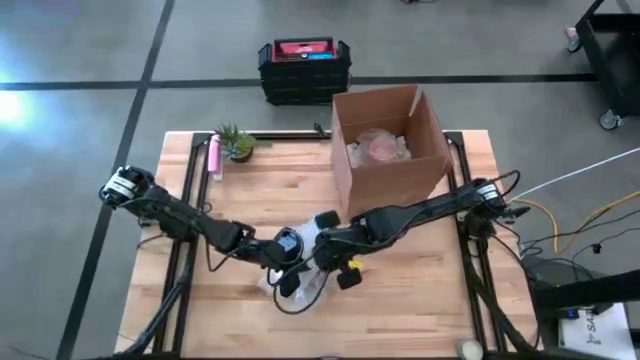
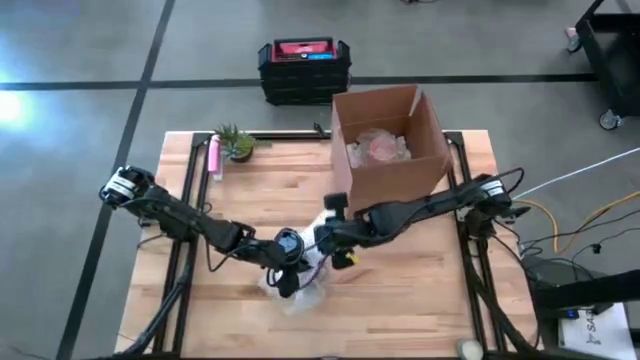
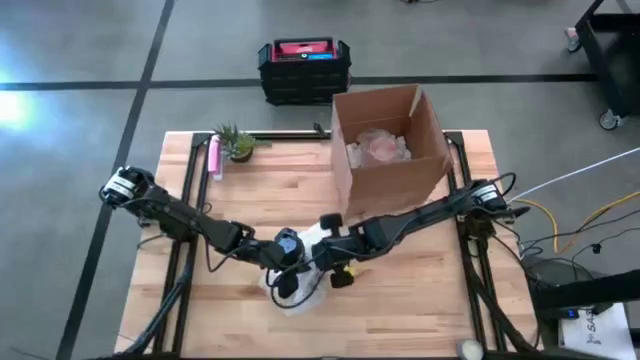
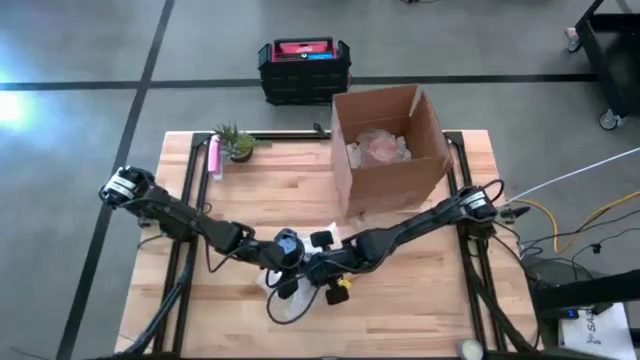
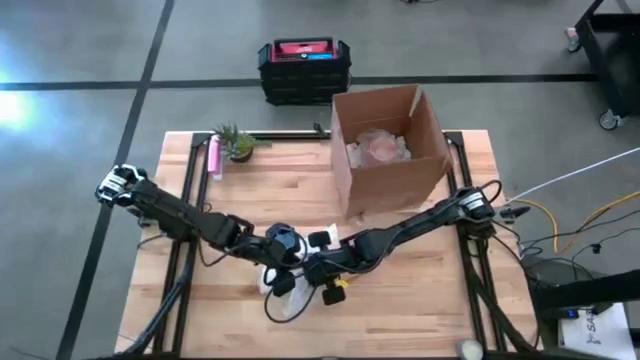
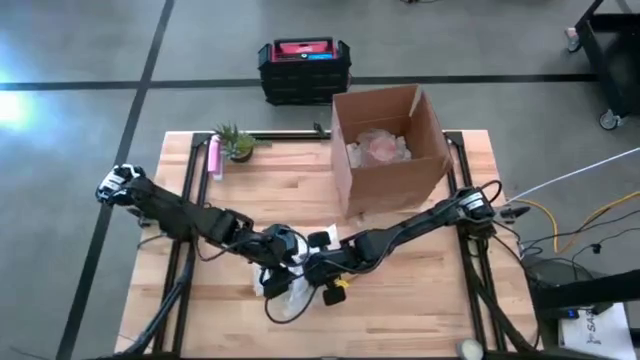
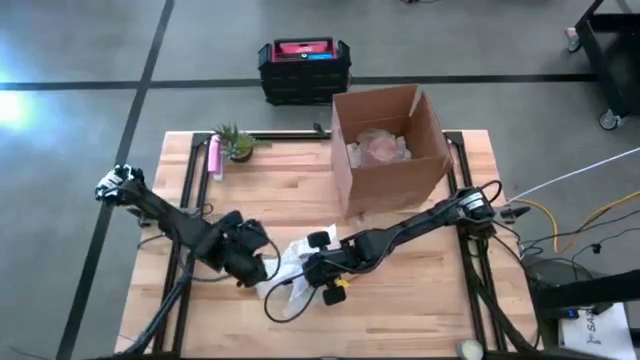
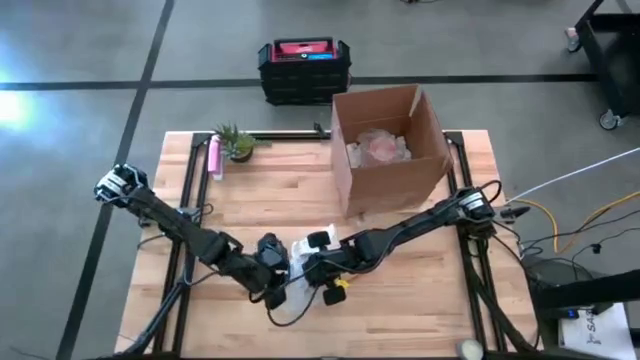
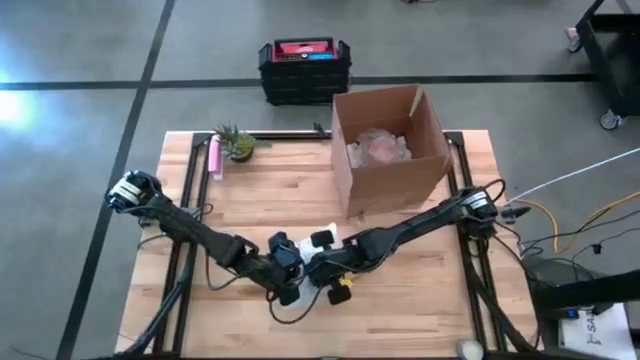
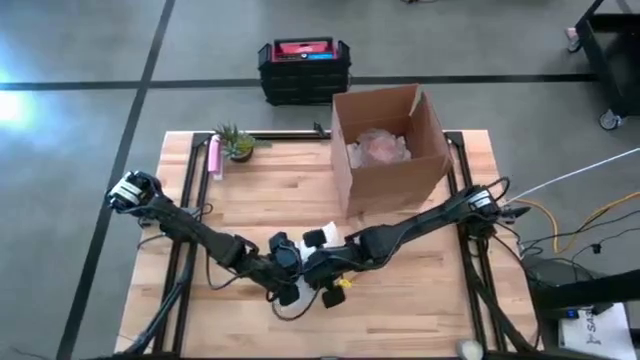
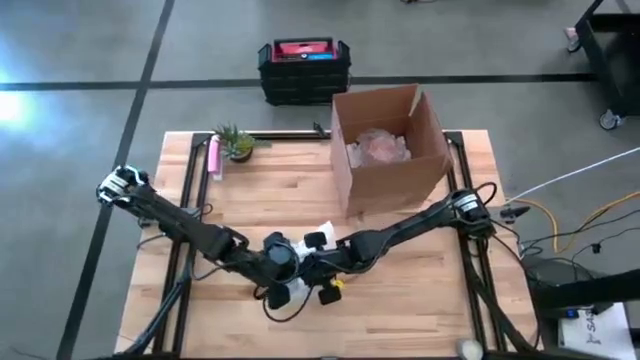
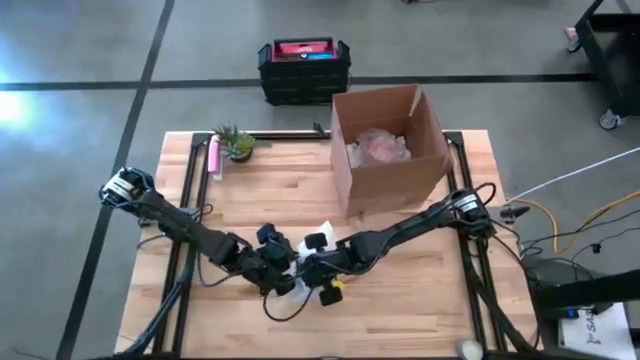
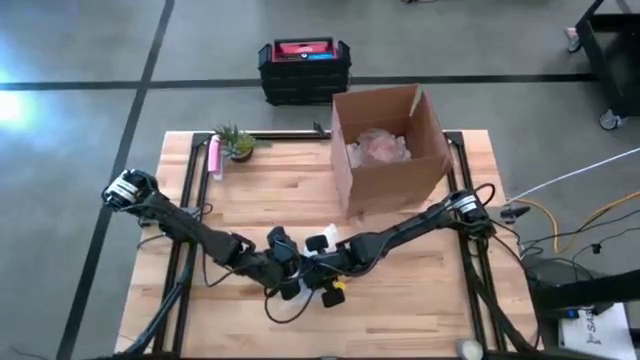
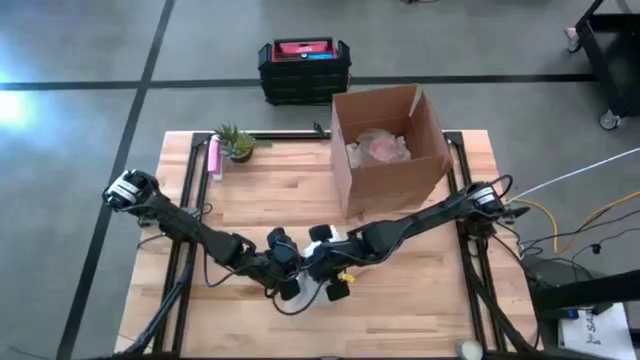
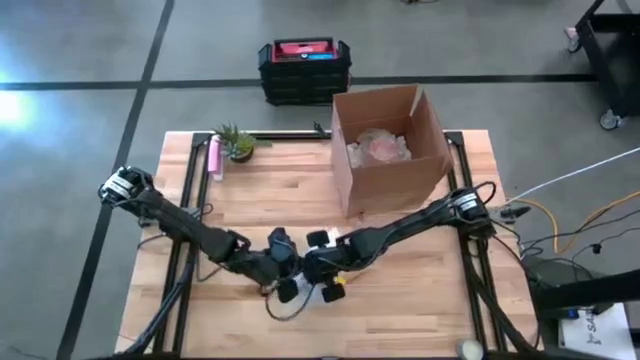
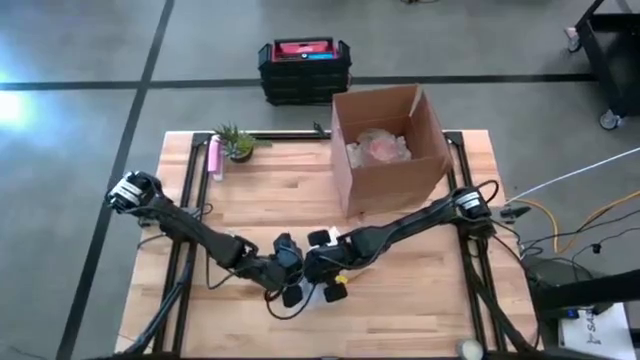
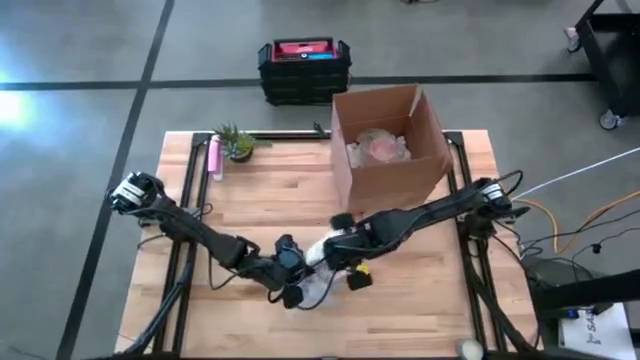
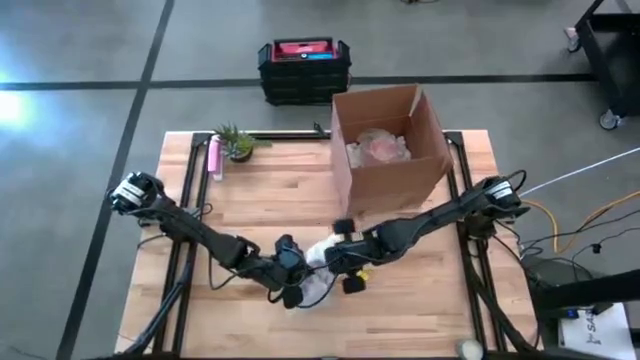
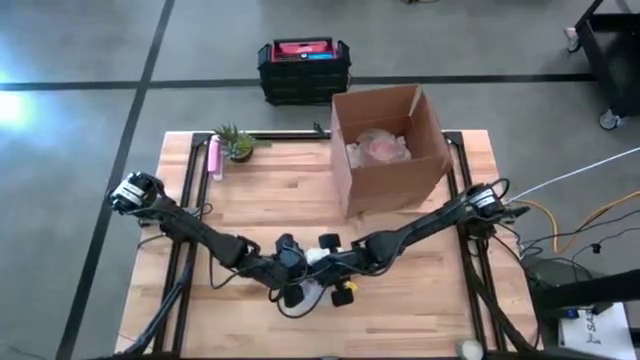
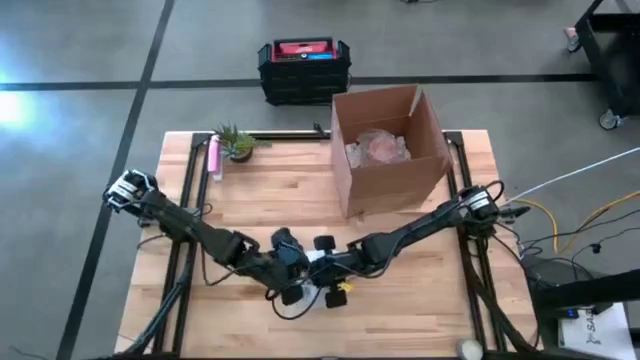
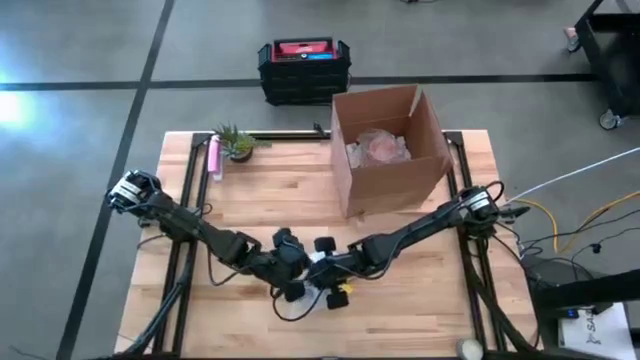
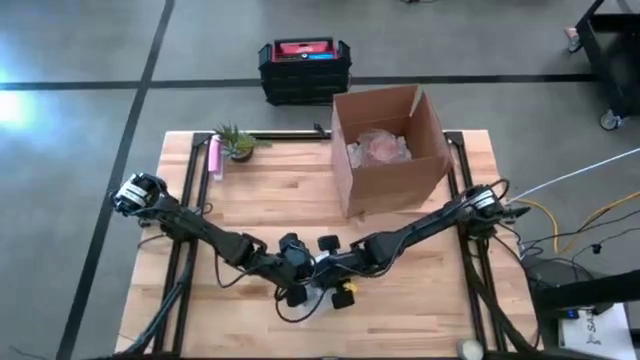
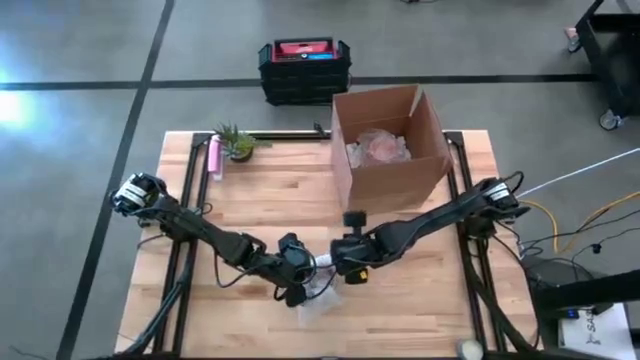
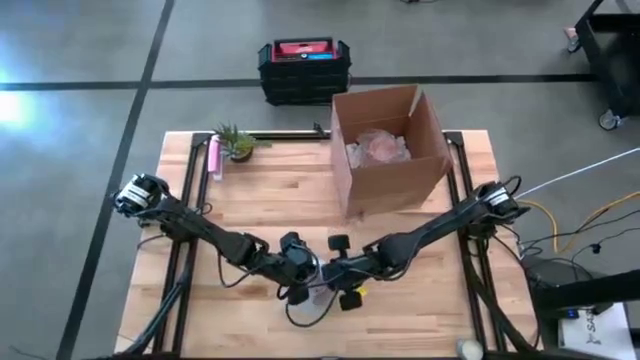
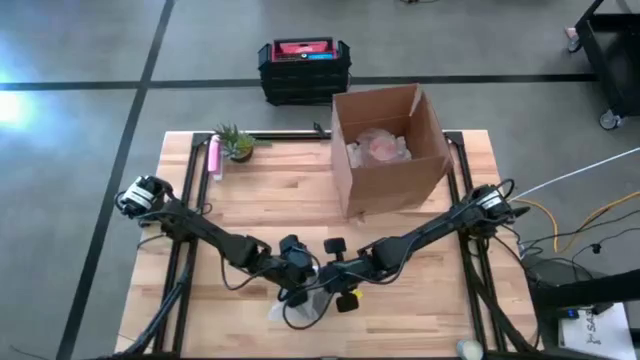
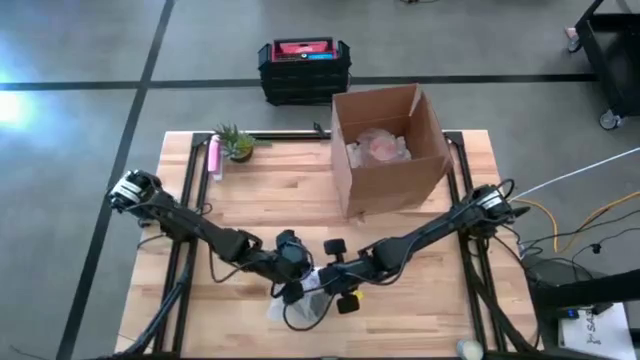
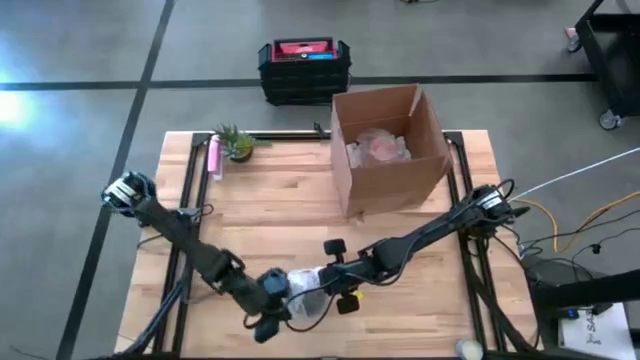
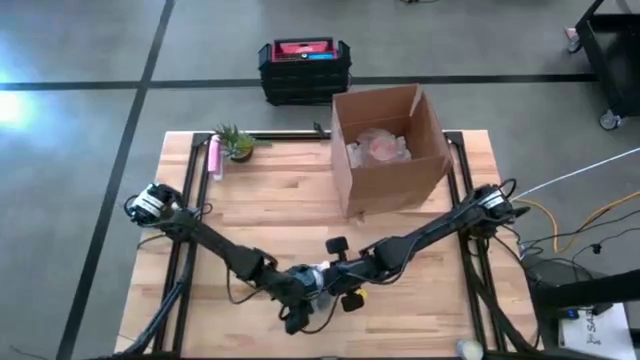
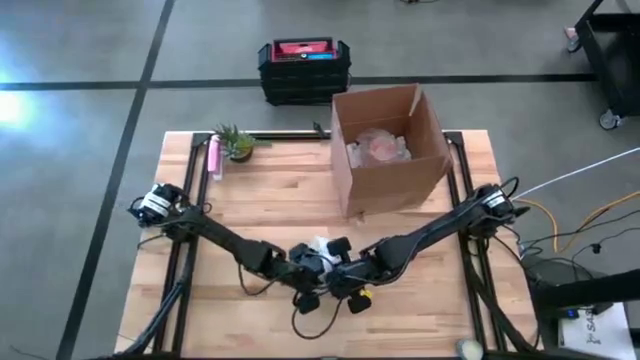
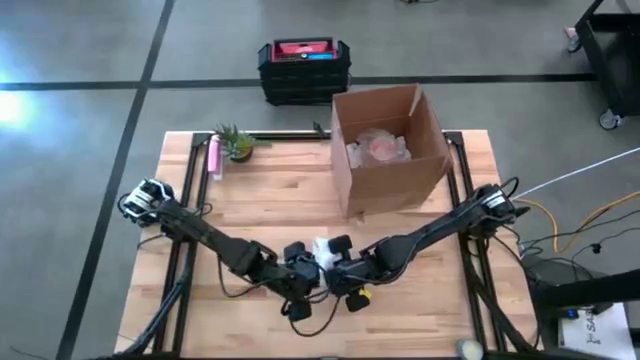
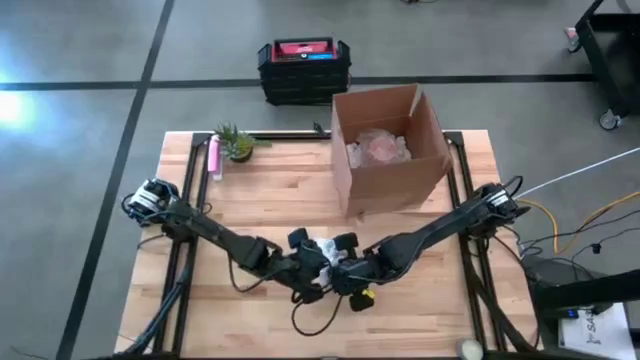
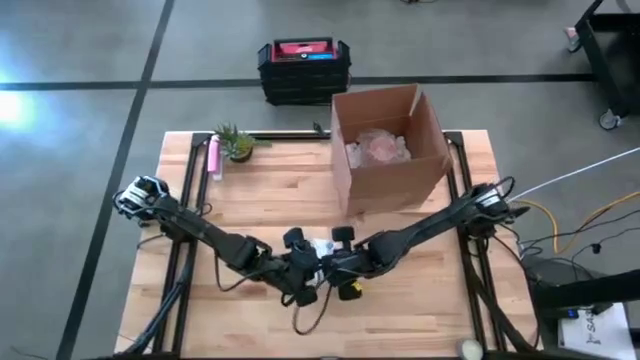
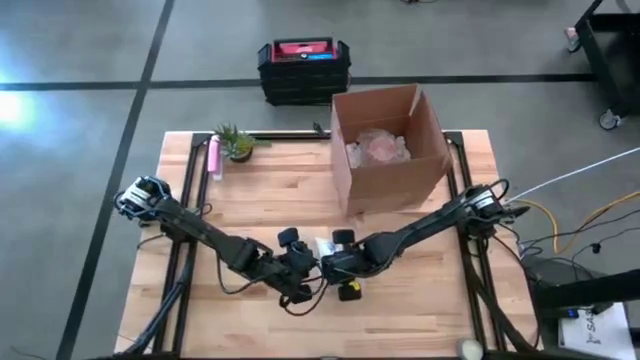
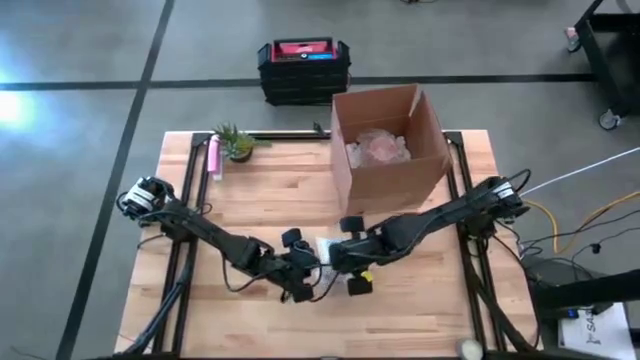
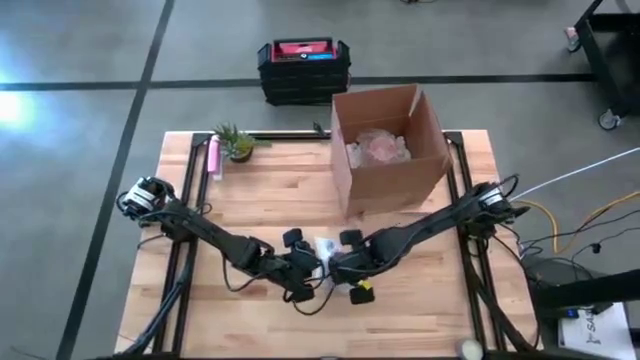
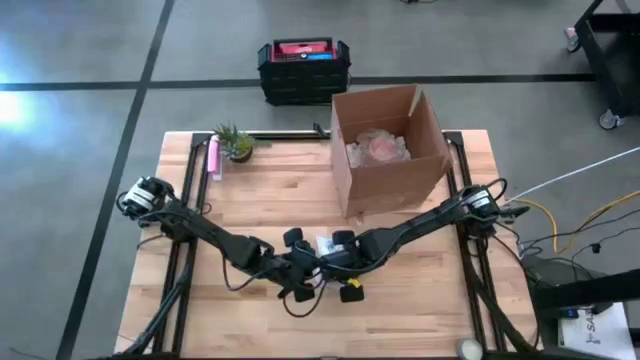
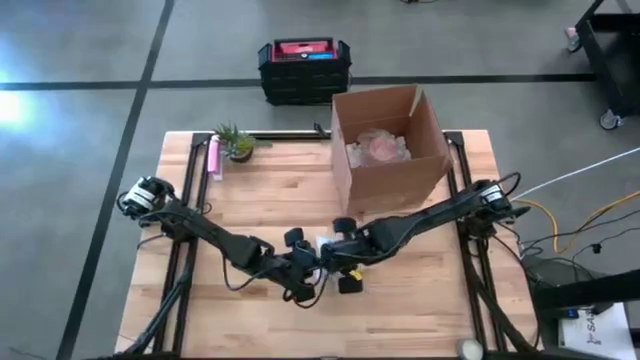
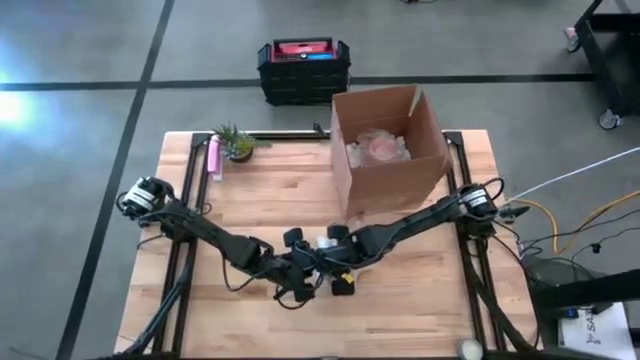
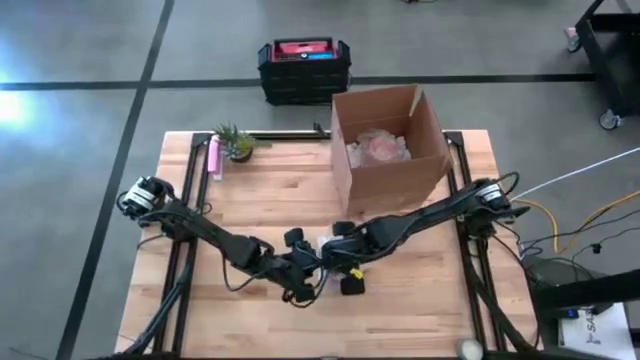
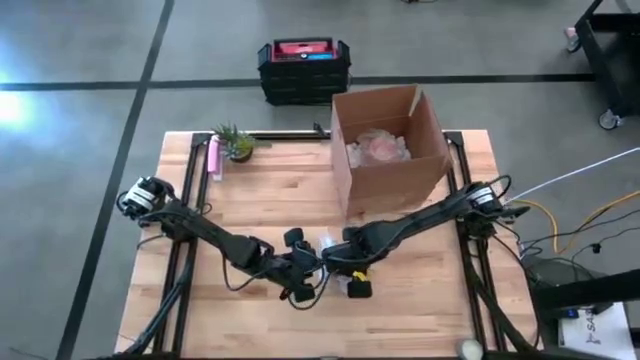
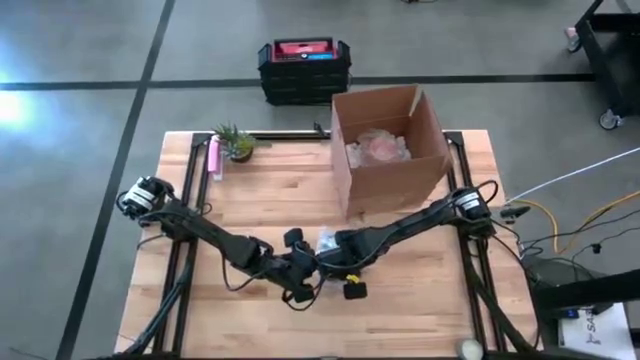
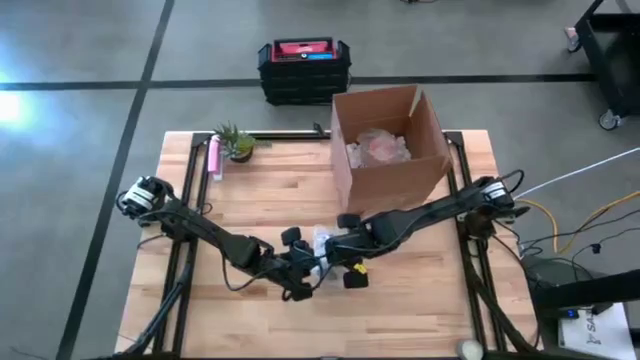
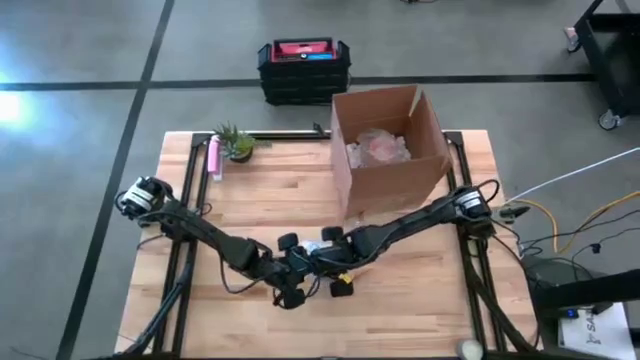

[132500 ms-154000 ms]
Task: wrap mug
Wrap the black mug with transparent bubble wrap
